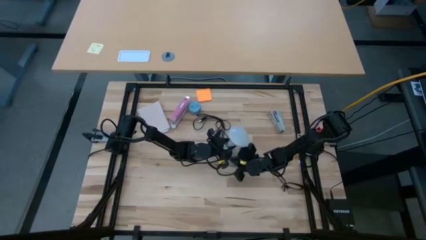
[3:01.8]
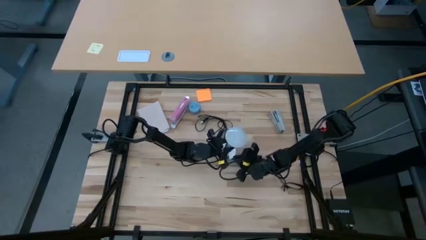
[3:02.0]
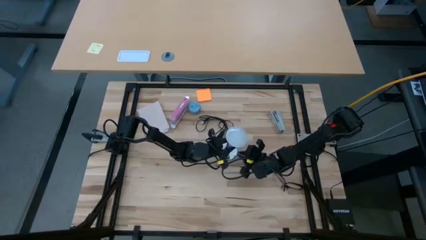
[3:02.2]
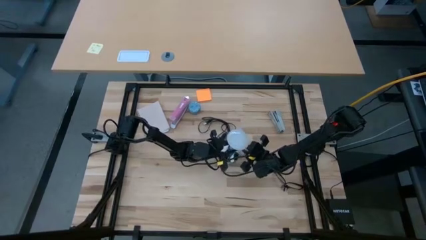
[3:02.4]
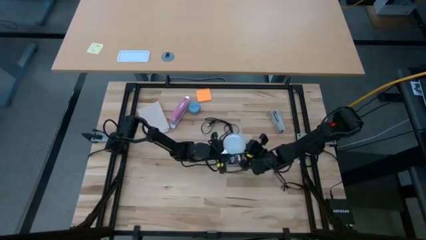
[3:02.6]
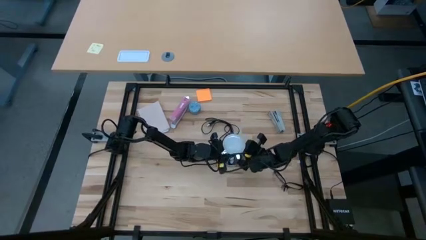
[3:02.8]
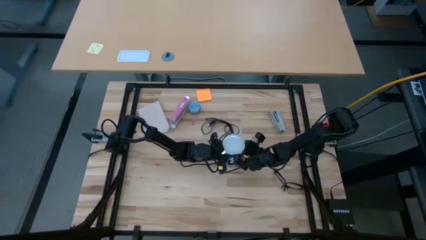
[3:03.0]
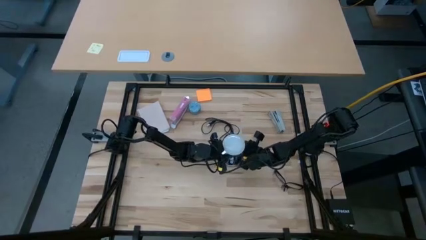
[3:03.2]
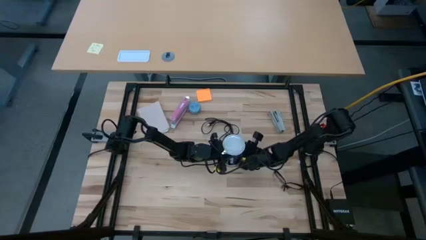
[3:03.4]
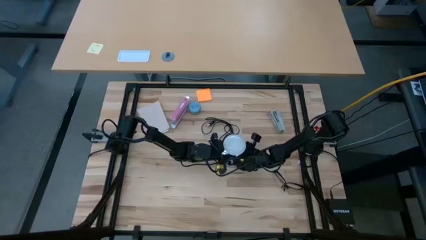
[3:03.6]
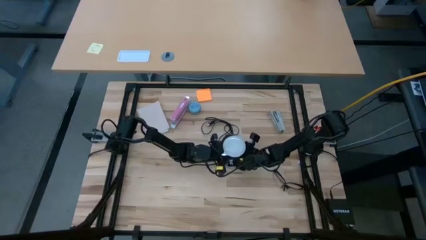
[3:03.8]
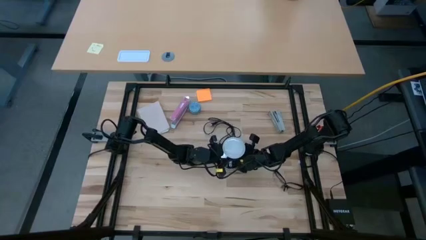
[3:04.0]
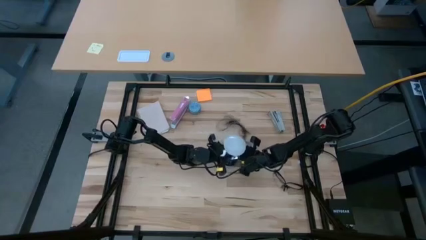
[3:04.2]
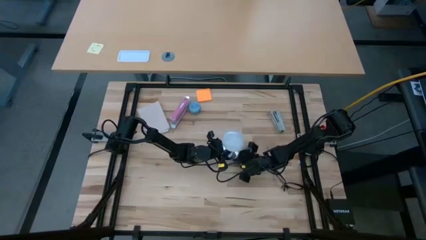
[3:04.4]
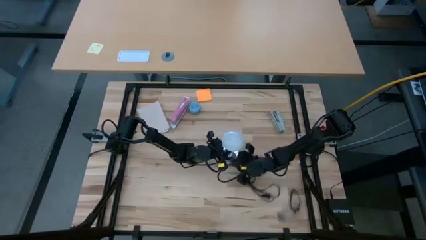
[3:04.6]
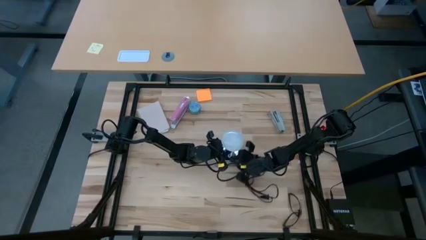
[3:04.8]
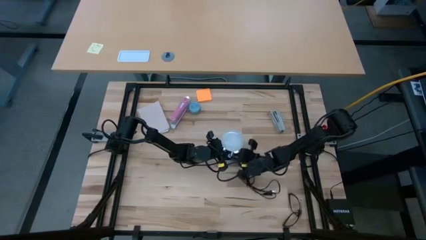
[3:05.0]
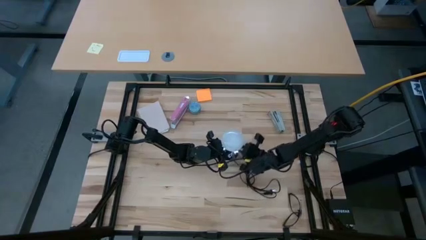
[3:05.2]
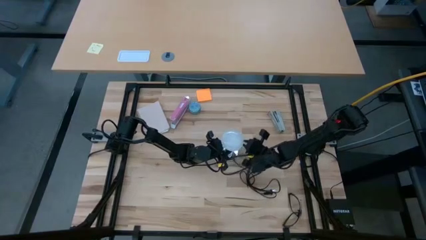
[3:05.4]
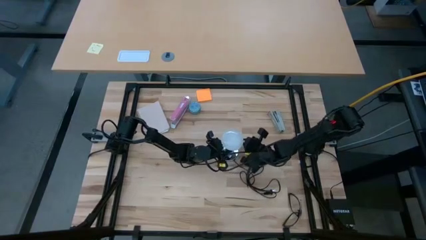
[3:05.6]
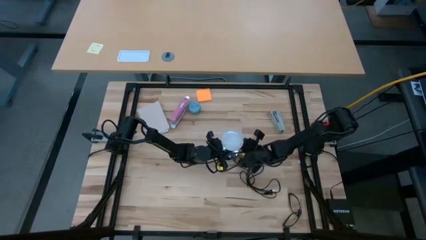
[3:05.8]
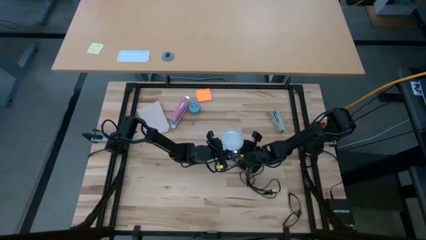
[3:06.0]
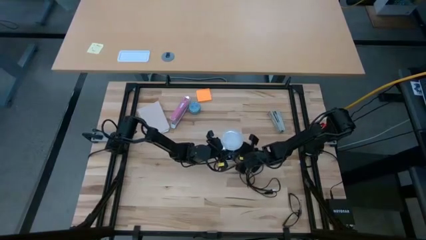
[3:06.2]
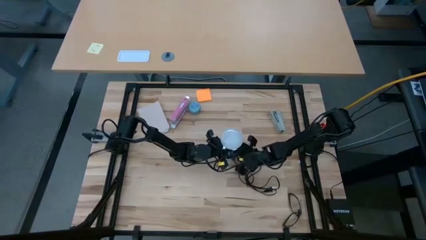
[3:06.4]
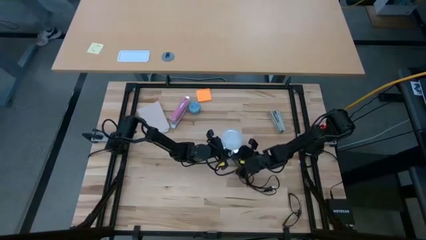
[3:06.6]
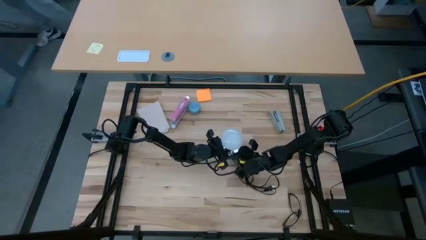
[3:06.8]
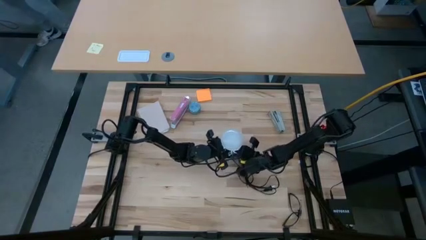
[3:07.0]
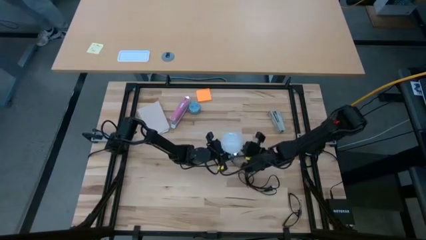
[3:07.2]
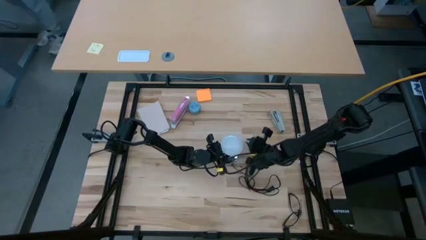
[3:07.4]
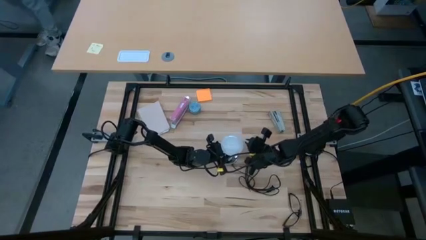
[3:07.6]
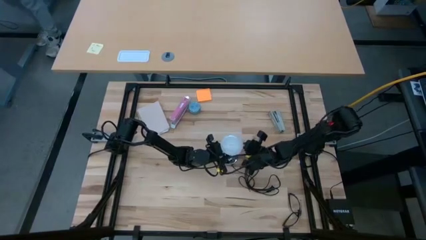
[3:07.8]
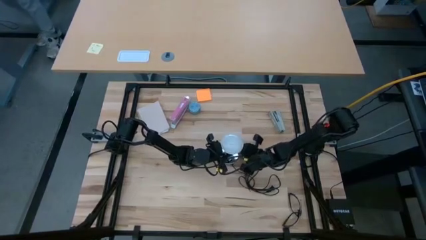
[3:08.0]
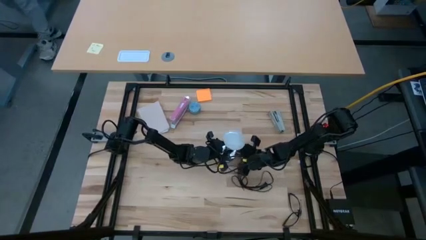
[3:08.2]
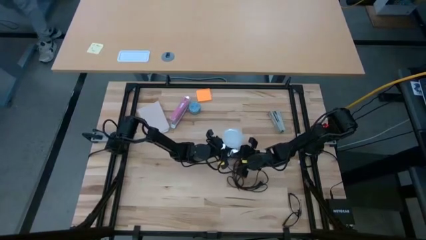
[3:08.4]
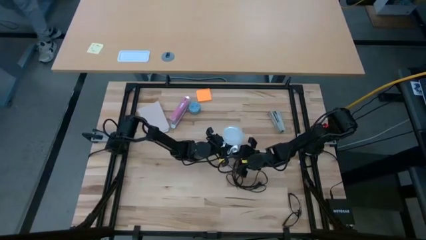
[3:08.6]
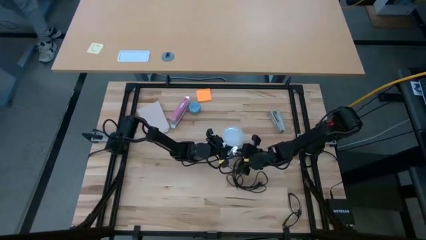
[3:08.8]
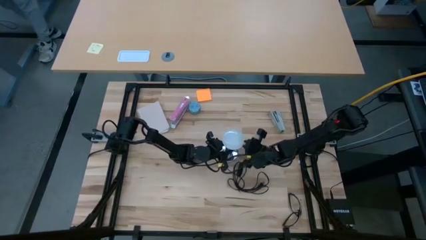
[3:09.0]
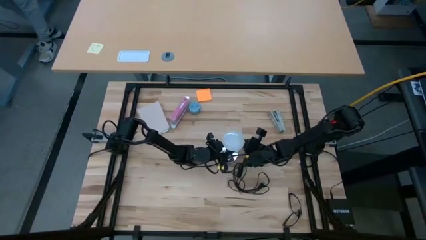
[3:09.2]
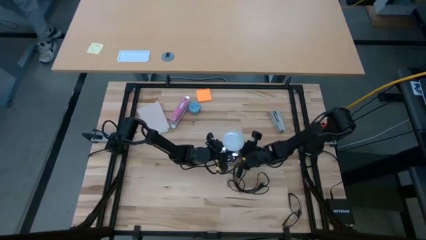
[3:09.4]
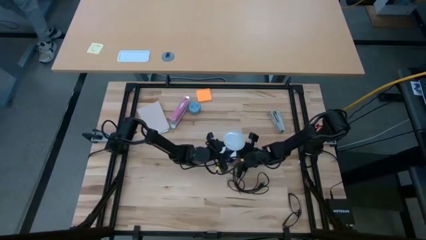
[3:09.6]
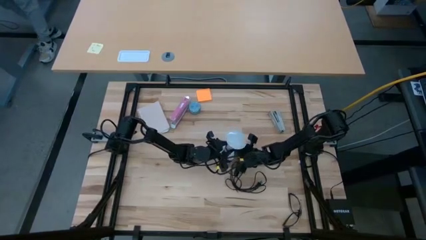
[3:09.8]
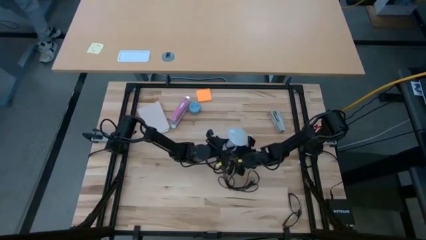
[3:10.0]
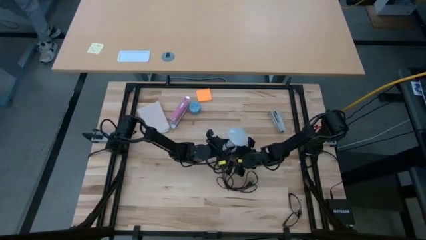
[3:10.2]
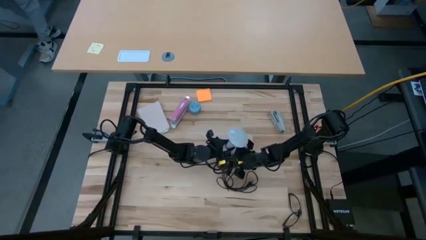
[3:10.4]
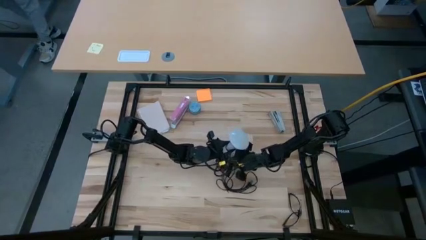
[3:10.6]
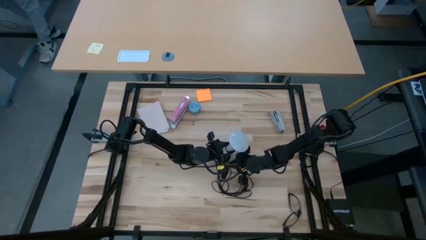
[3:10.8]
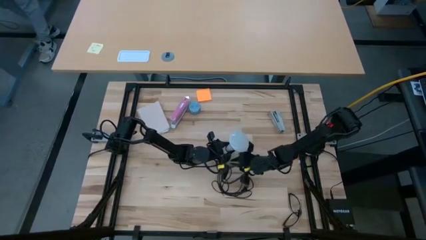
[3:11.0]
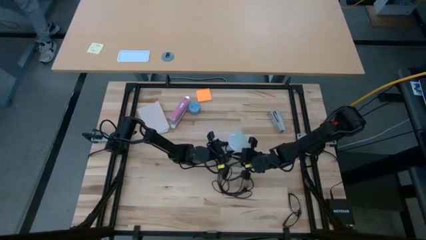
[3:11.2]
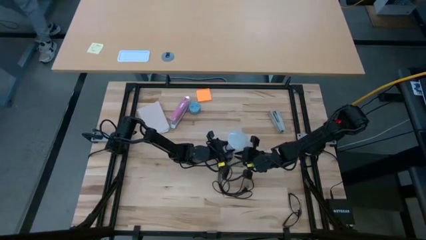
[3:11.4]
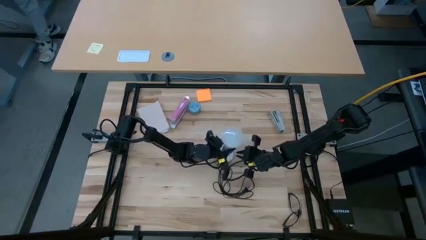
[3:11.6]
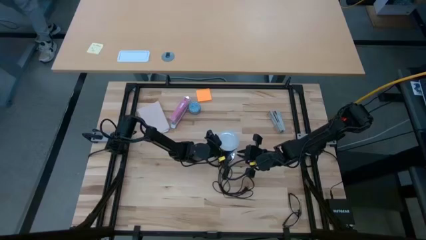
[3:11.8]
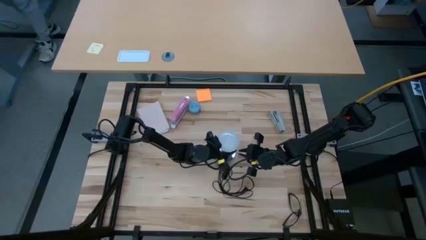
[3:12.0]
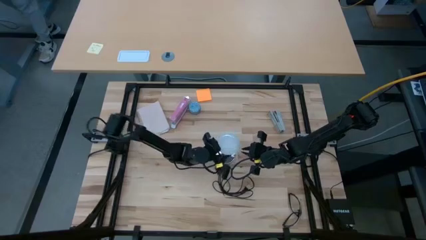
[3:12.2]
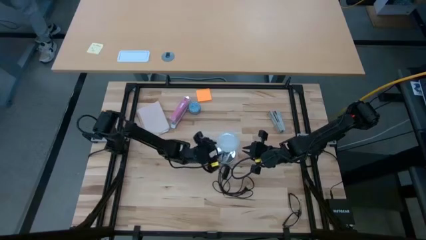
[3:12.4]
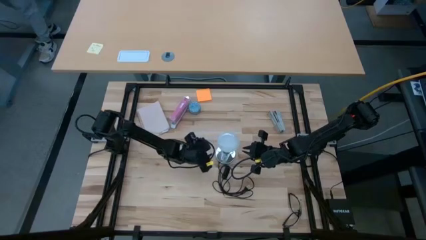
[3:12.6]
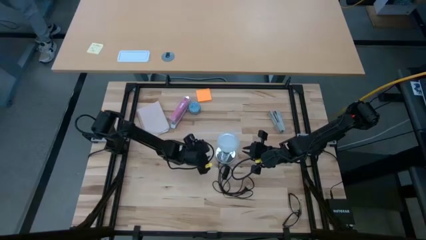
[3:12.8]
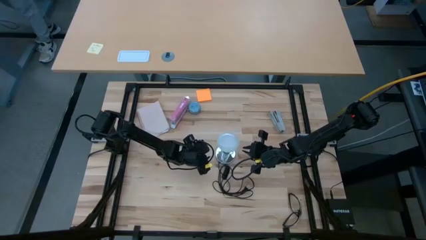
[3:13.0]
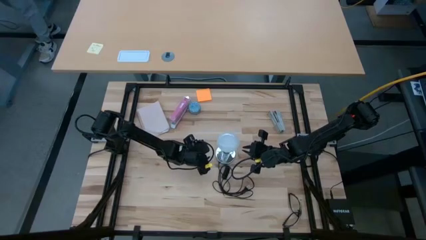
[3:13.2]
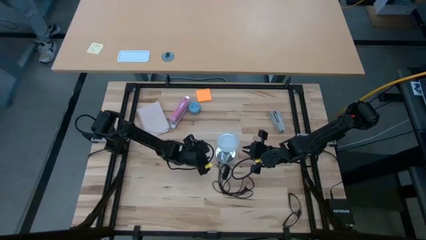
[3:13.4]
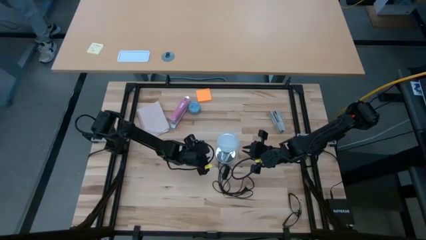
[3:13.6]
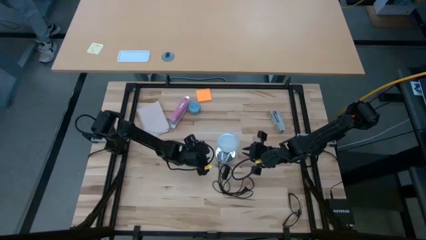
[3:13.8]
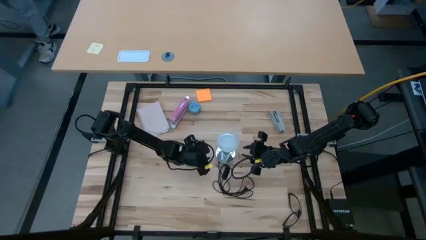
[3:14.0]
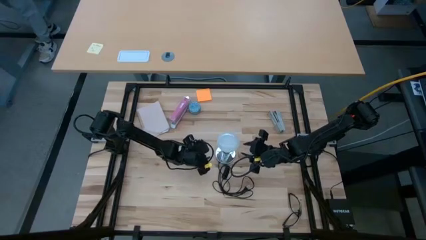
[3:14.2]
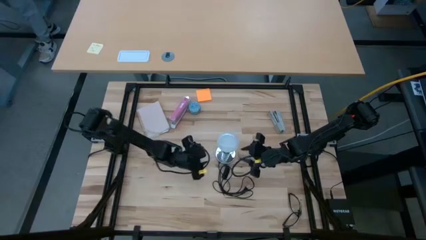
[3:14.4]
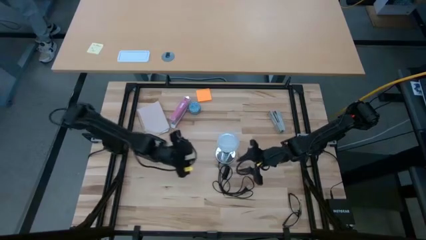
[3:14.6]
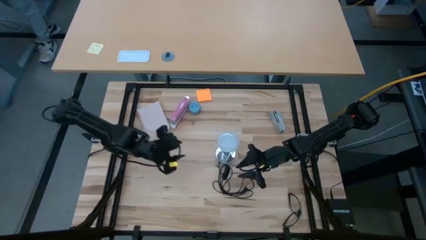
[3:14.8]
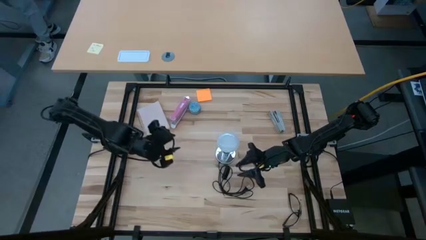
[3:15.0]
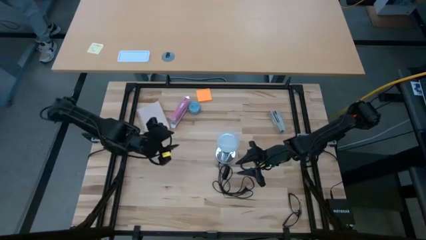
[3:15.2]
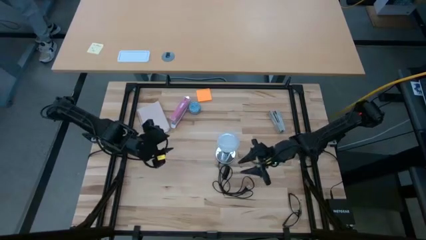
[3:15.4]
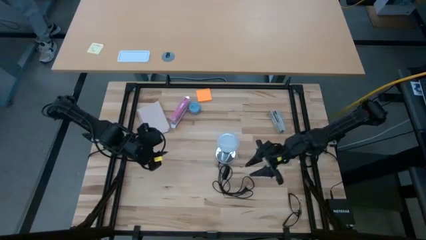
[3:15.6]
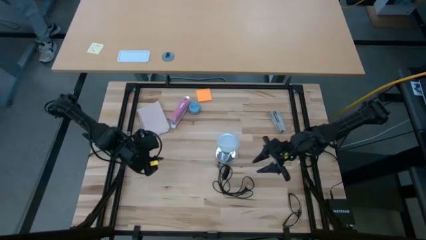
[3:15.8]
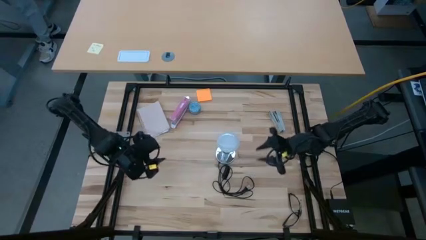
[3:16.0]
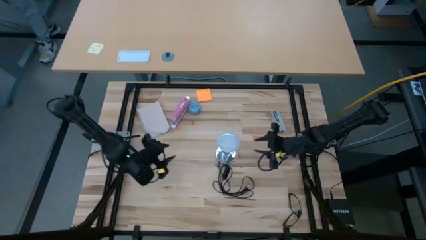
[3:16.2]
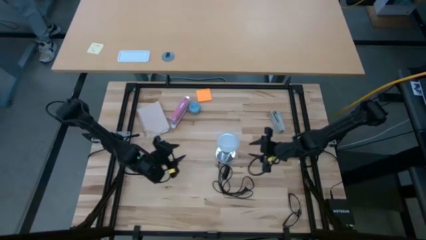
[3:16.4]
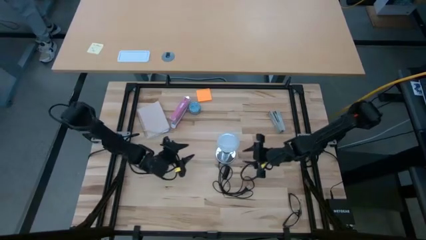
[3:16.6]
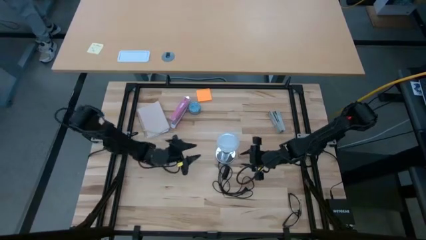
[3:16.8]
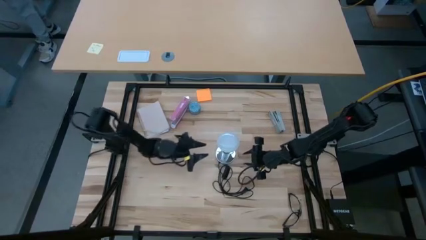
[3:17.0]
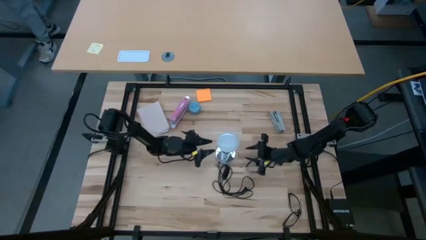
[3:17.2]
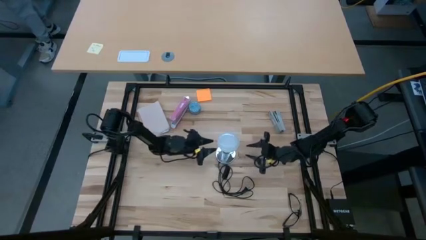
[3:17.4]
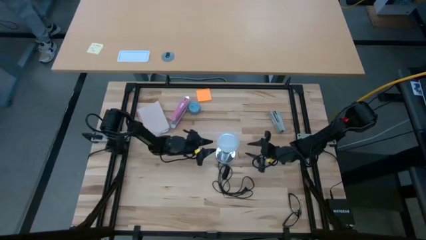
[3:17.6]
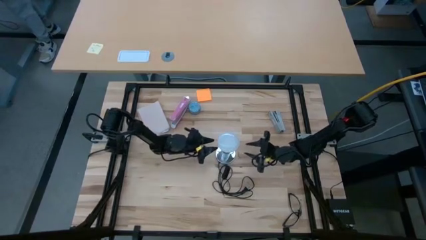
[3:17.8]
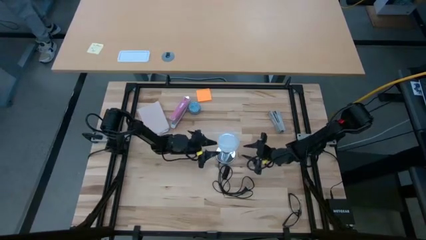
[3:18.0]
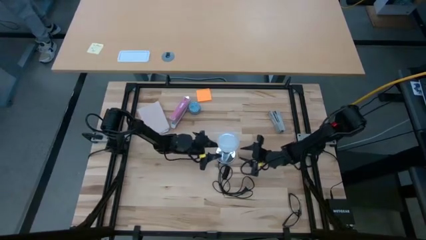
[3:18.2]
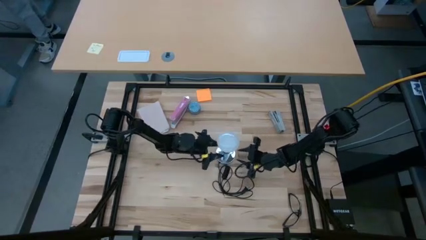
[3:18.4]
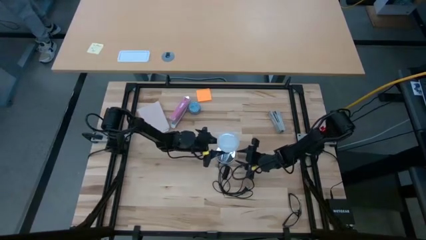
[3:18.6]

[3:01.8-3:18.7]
Task: Screw lightbulb
Remove the lightbulb from the lamp
